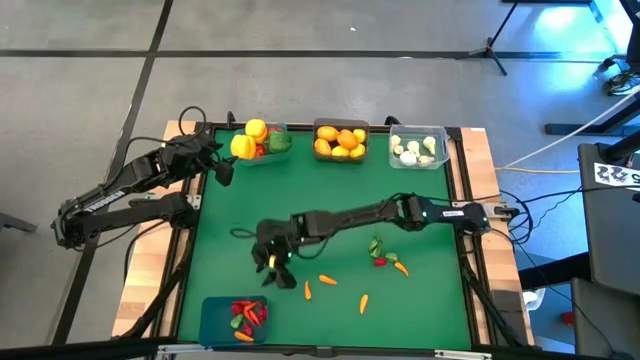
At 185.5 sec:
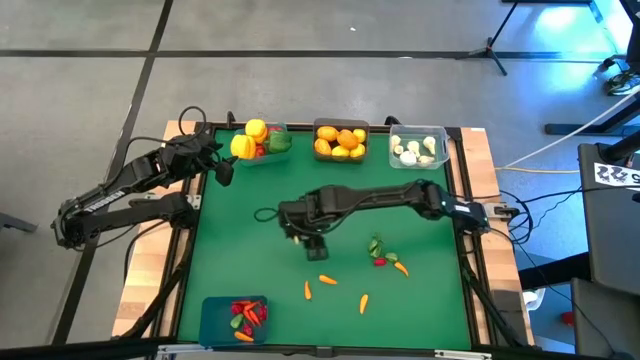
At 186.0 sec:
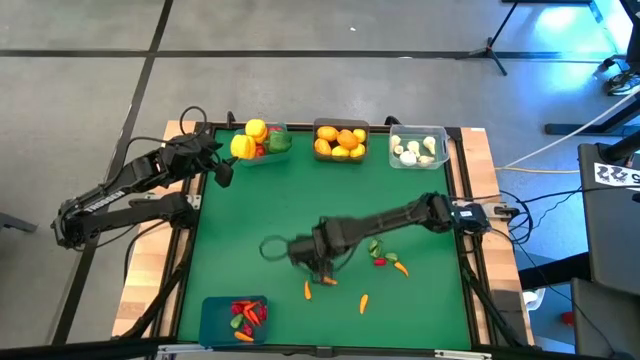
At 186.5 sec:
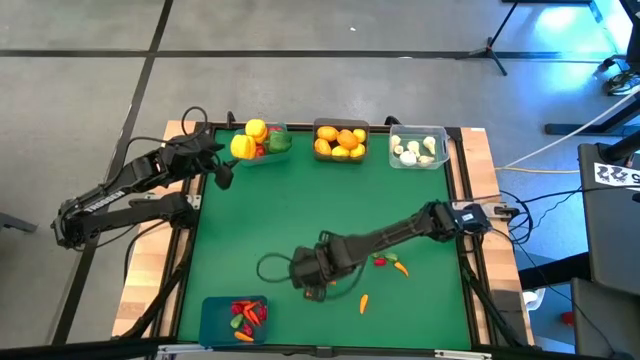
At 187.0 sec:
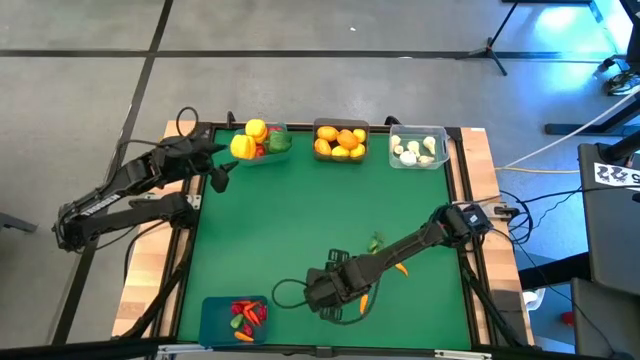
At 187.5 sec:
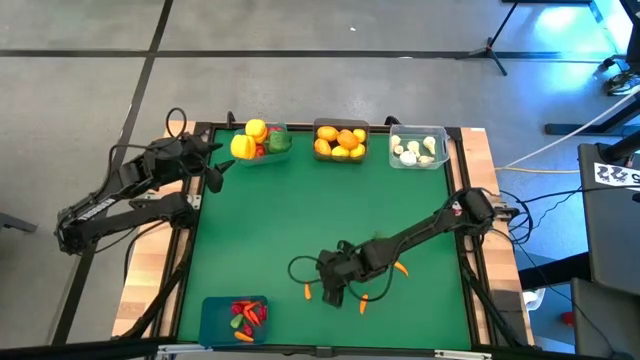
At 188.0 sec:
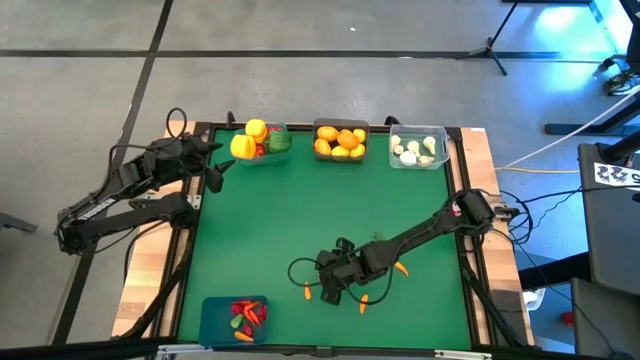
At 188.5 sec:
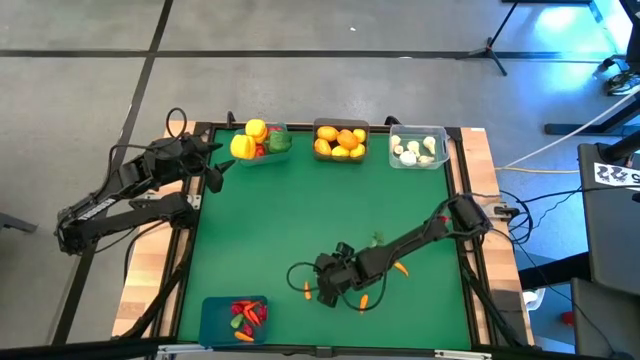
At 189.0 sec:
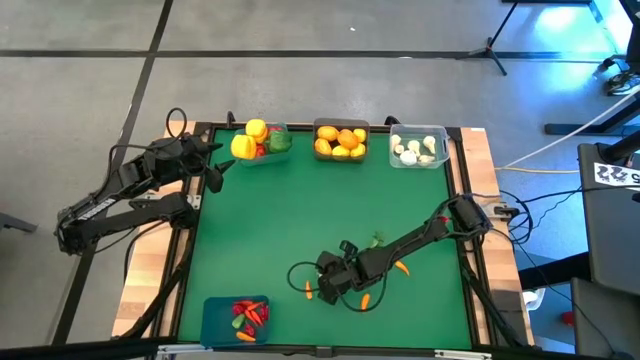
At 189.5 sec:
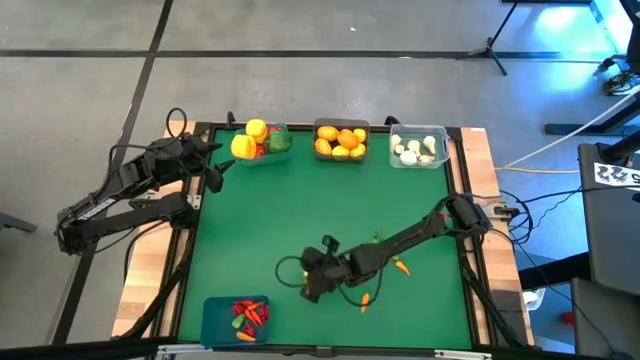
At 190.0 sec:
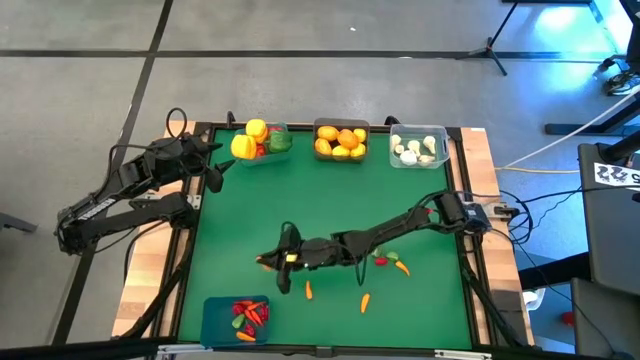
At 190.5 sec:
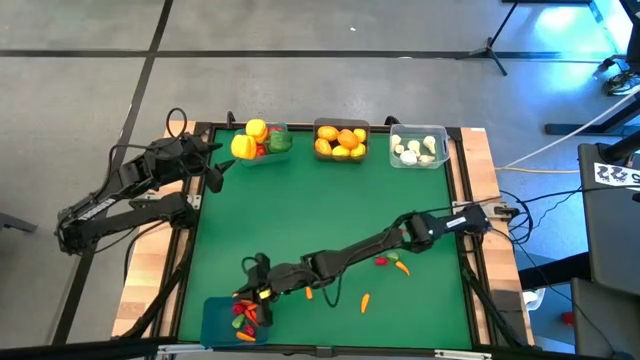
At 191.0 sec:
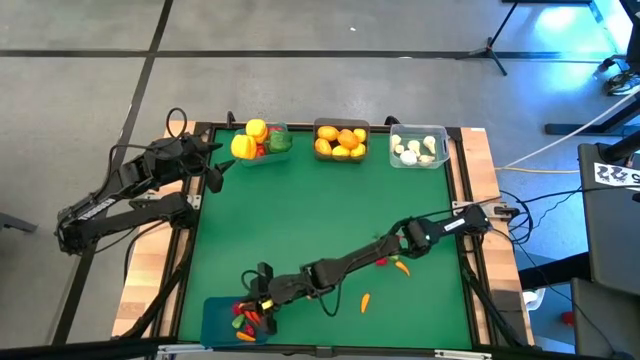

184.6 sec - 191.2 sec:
Task: Sort produce into baskets
Put the yellow chili pepper into the dark blue bin

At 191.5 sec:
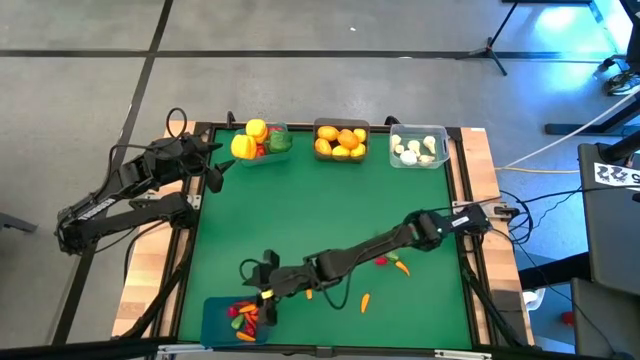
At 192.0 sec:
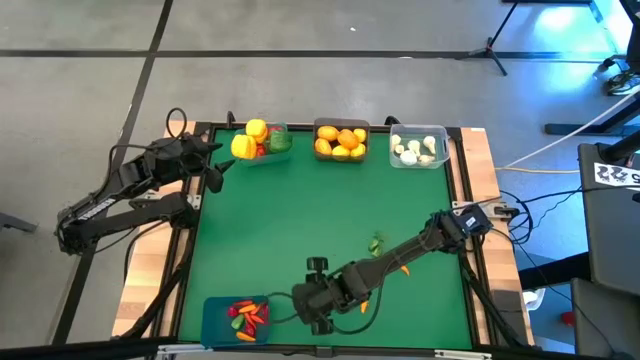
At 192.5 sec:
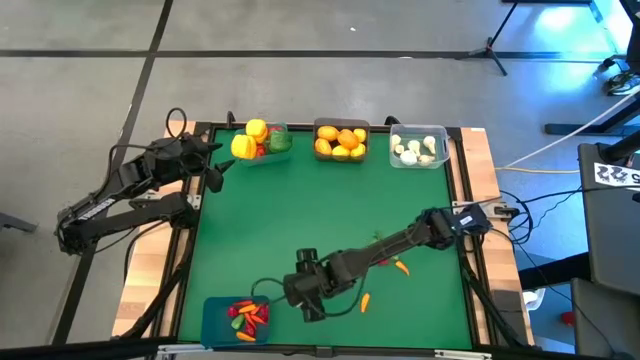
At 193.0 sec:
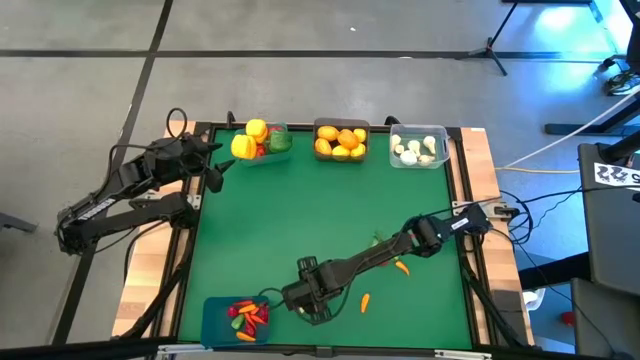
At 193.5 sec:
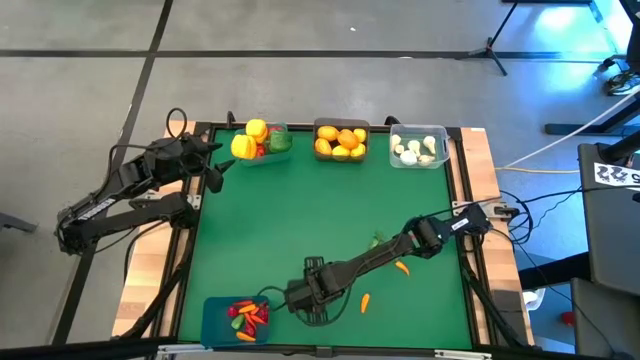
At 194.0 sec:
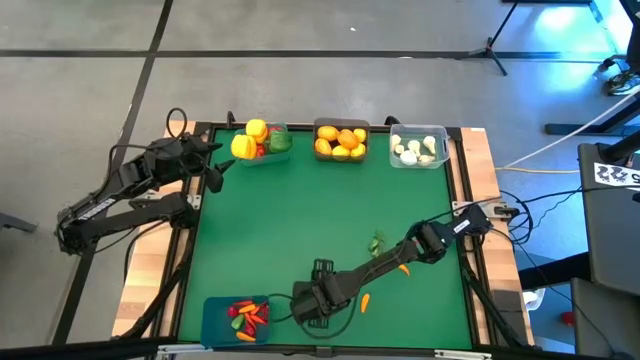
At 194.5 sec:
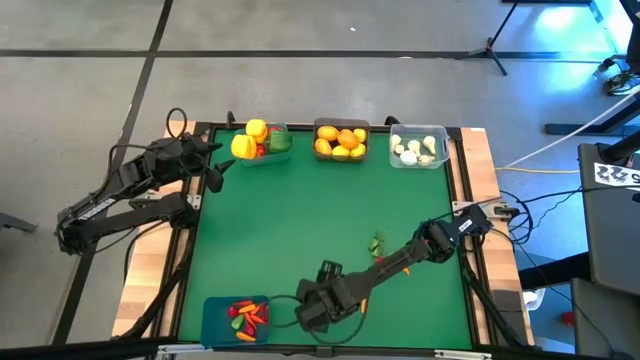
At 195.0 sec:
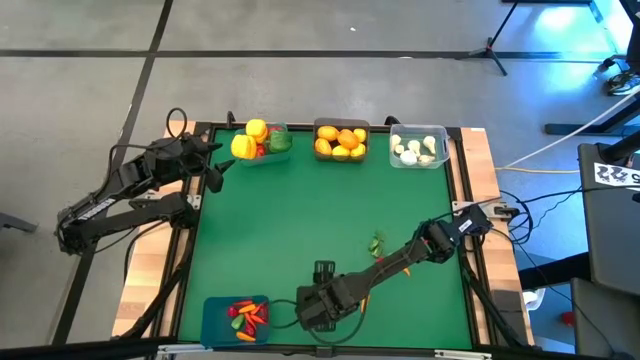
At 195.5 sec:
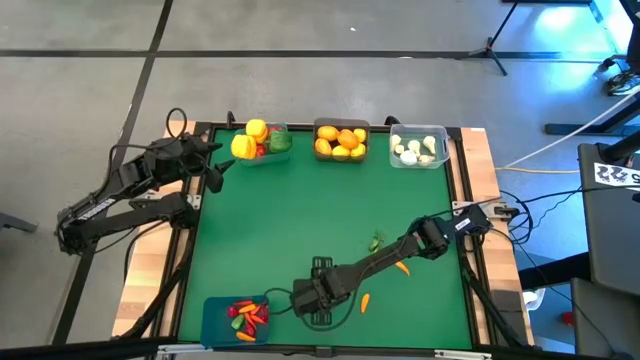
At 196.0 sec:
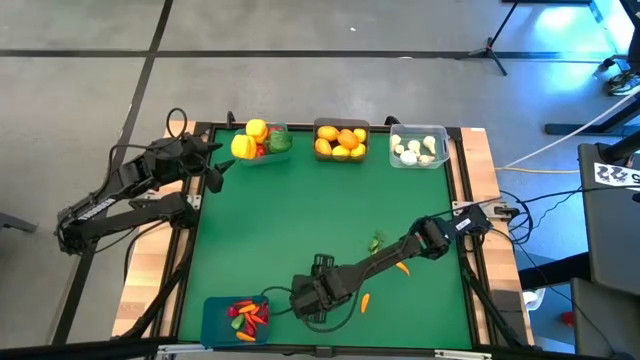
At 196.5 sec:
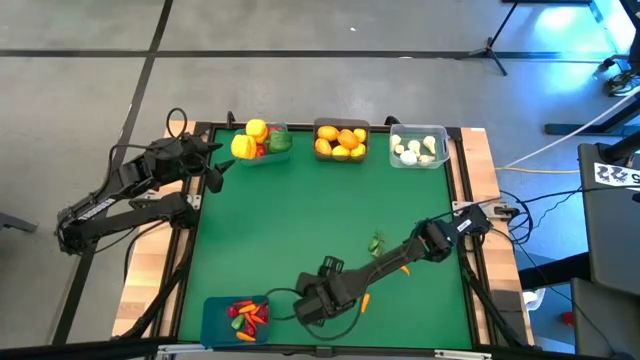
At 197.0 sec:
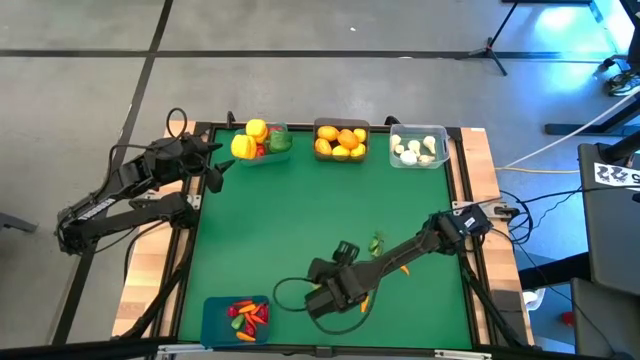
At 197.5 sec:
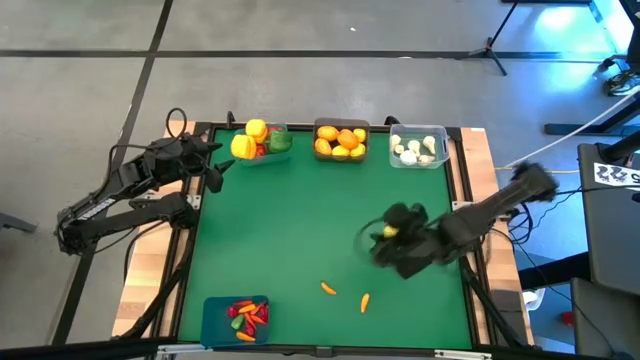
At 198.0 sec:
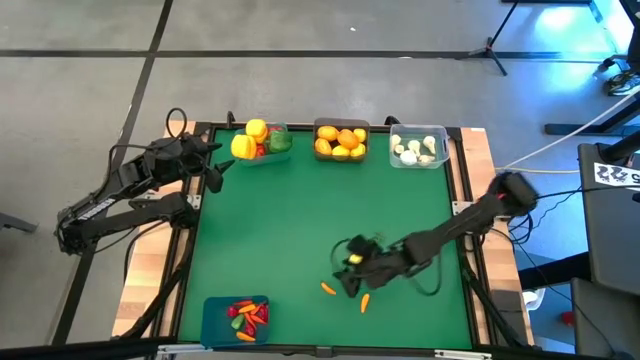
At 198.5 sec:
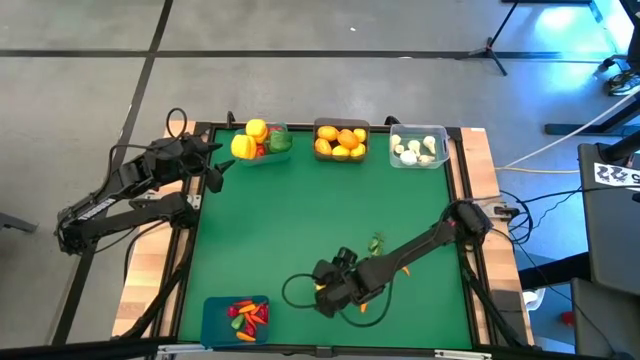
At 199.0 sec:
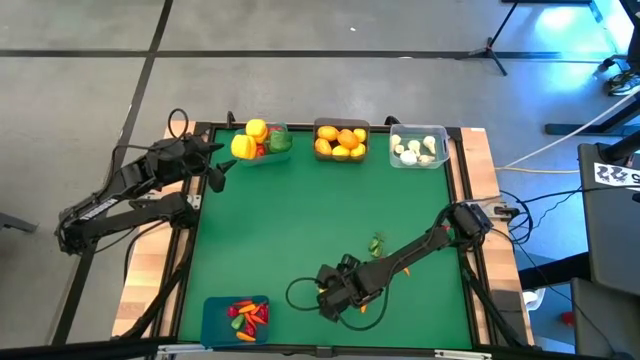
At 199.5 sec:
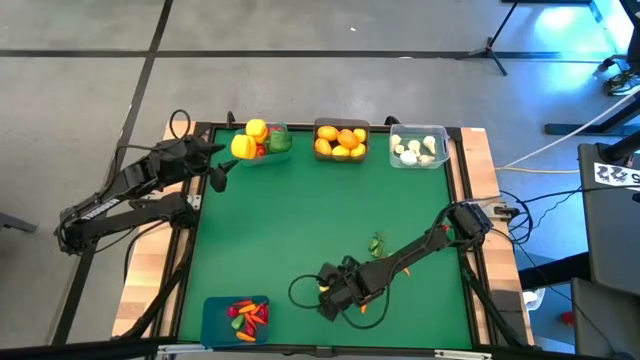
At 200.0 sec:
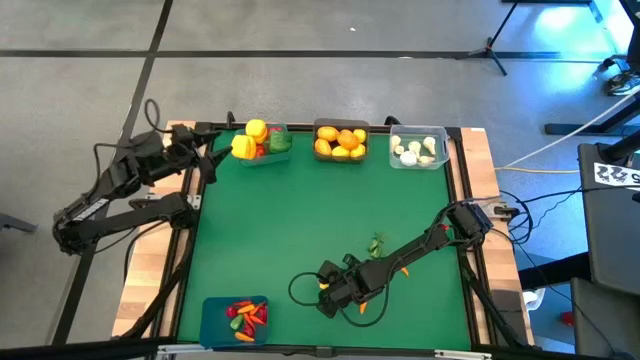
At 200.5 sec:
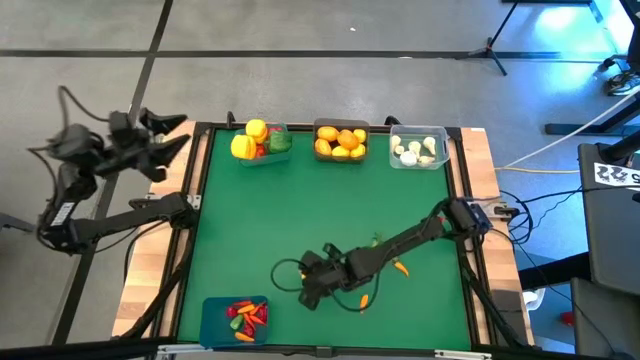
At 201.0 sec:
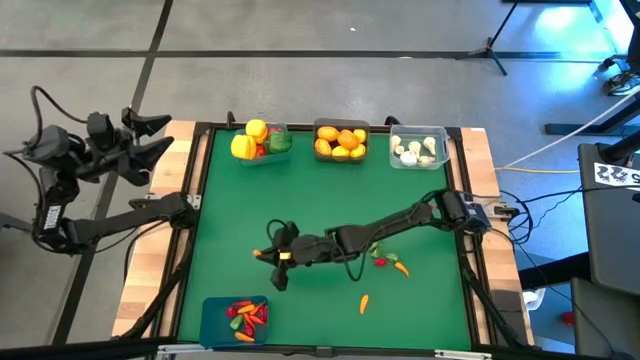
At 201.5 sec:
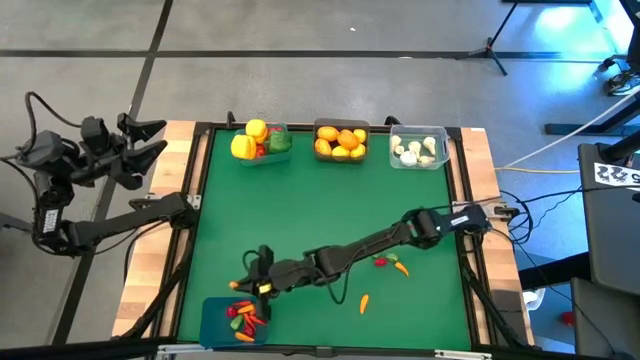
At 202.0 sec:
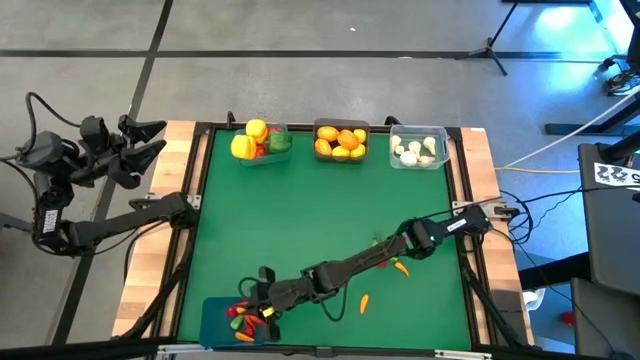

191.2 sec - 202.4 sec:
Put the yellow chili pepper into the dark blue bin

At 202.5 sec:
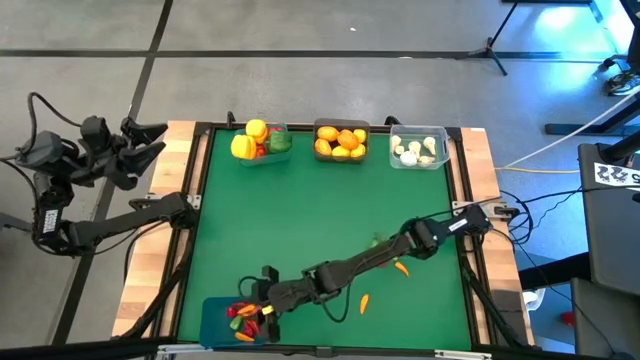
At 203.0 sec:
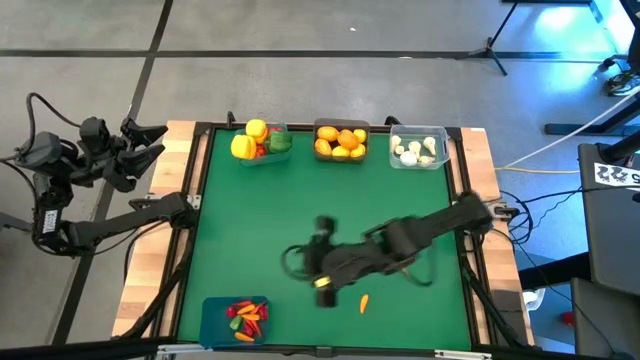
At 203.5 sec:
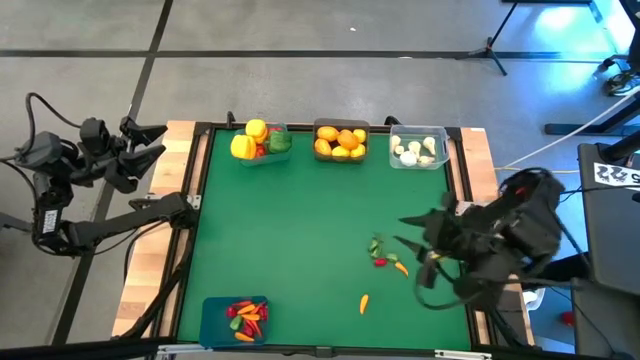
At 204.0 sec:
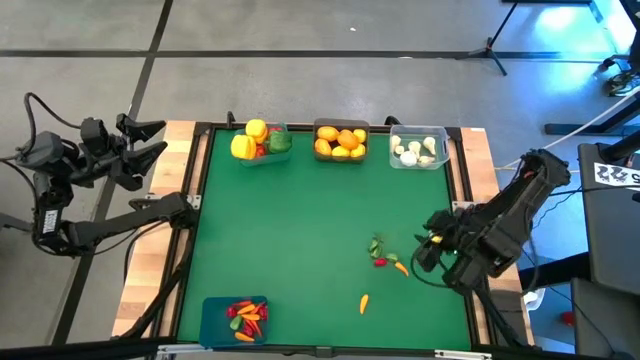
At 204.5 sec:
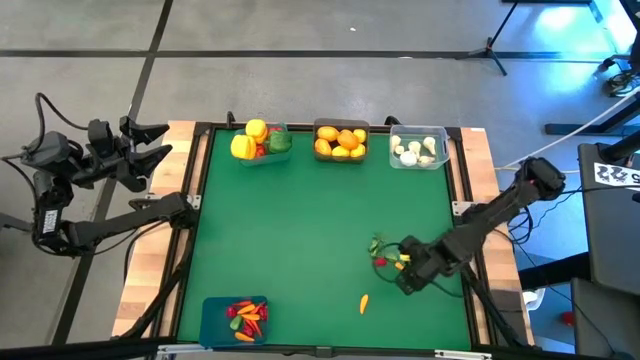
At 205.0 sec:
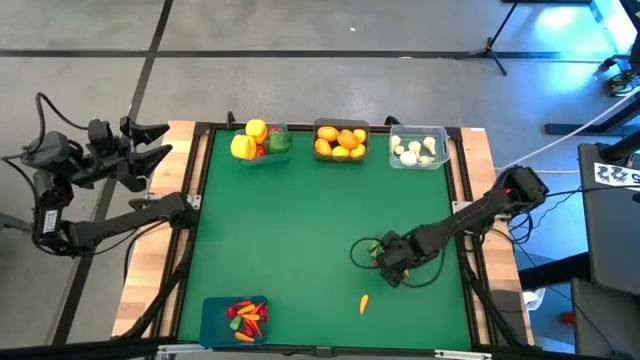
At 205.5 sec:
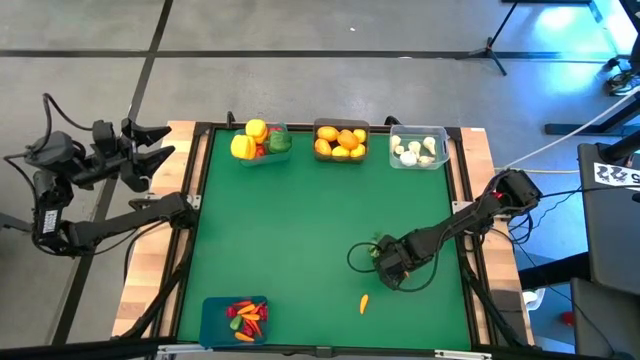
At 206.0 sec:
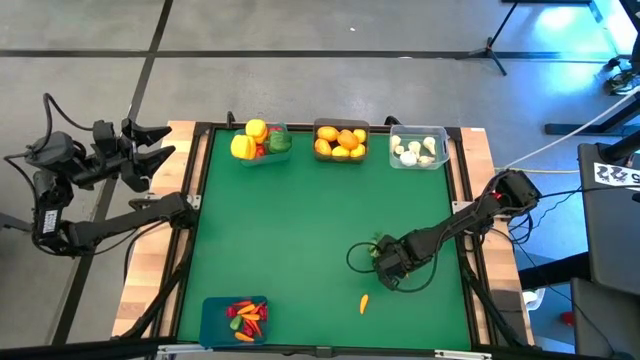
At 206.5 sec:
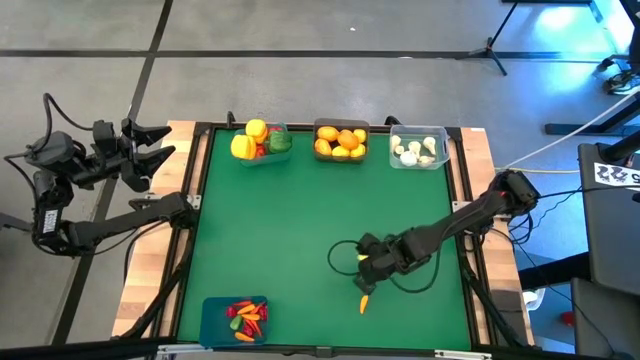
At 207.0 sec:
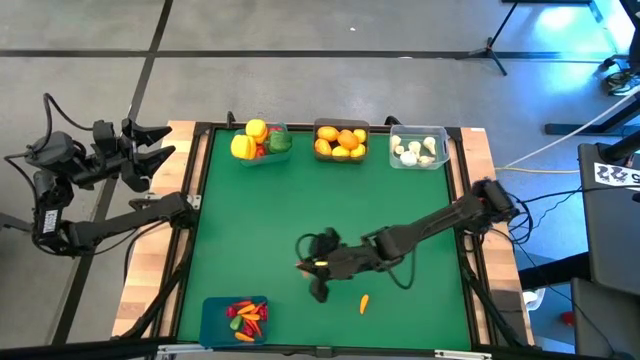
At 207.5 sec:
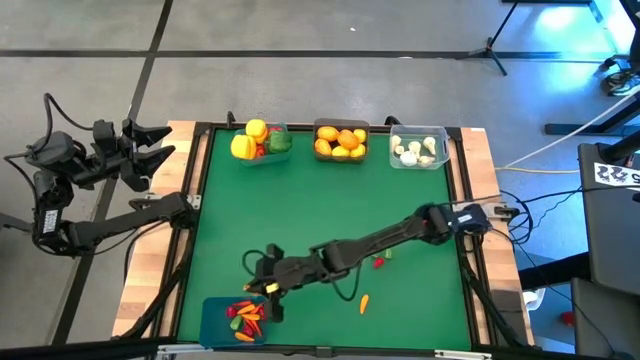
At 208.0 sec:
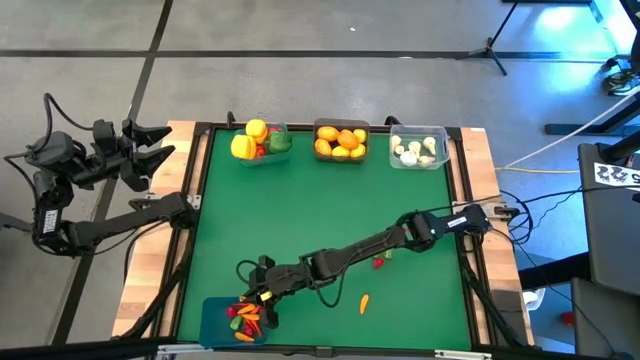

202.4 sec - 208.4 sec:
Put the yellow chili pepper into the dark blue bin
